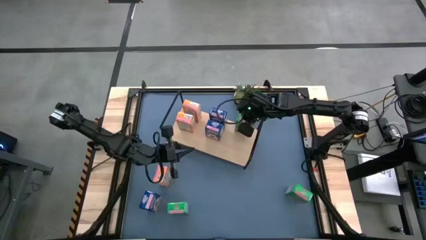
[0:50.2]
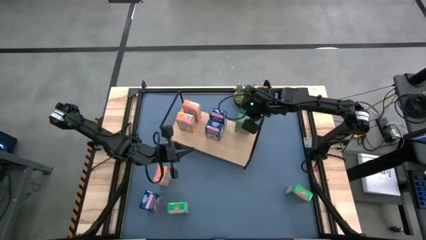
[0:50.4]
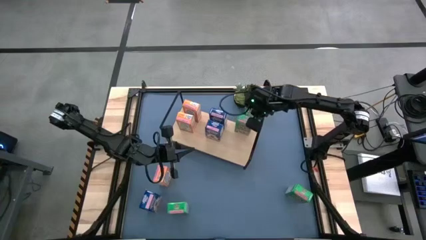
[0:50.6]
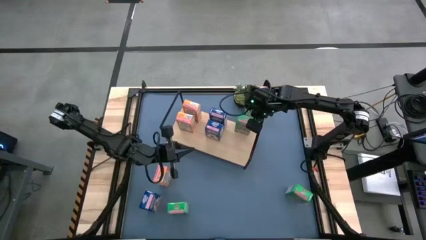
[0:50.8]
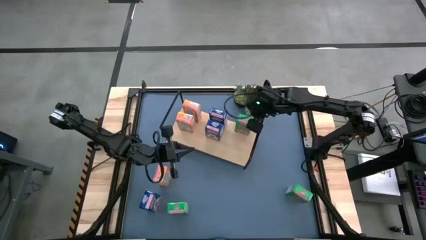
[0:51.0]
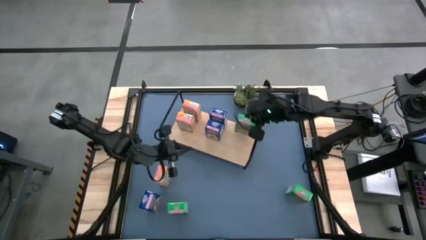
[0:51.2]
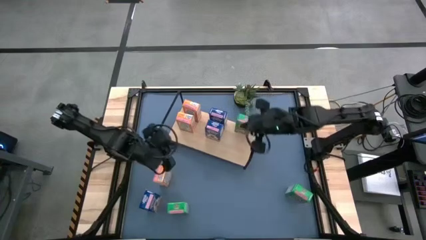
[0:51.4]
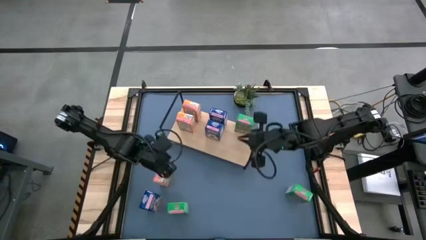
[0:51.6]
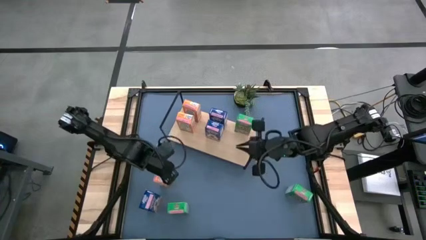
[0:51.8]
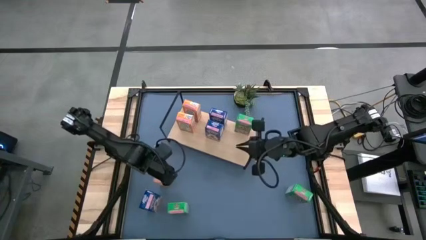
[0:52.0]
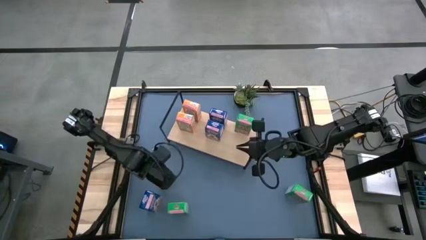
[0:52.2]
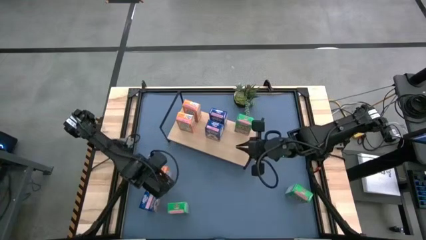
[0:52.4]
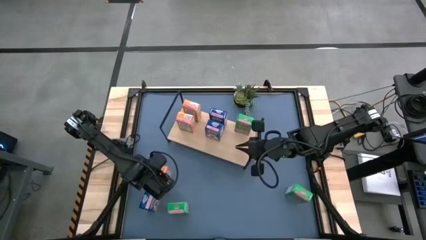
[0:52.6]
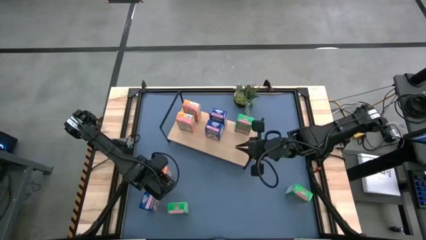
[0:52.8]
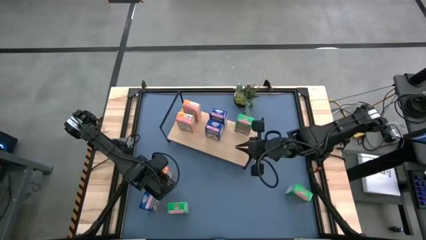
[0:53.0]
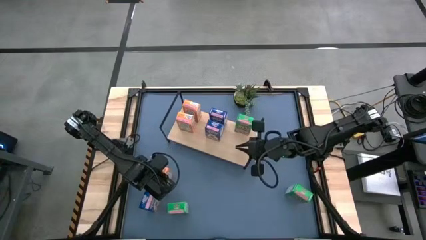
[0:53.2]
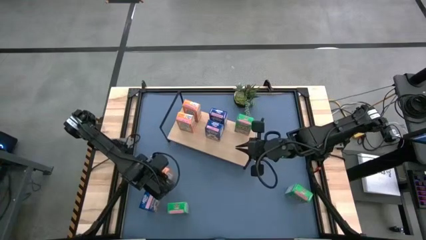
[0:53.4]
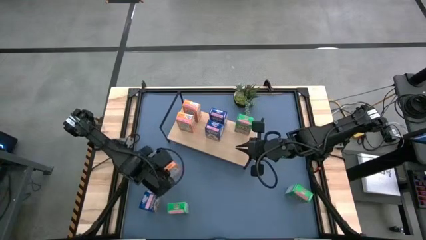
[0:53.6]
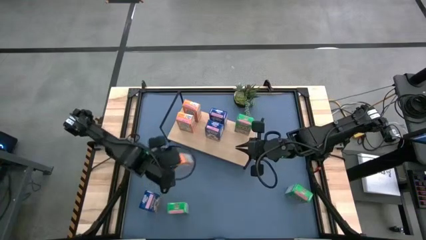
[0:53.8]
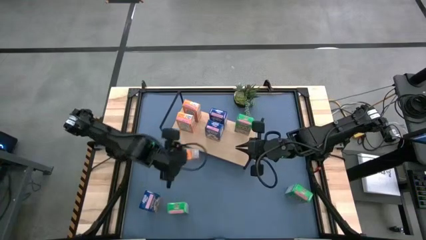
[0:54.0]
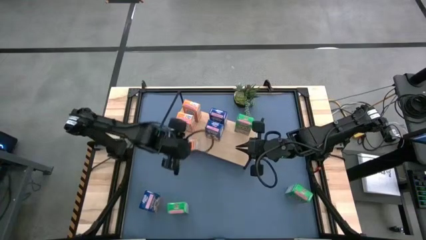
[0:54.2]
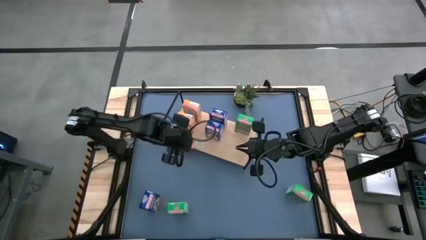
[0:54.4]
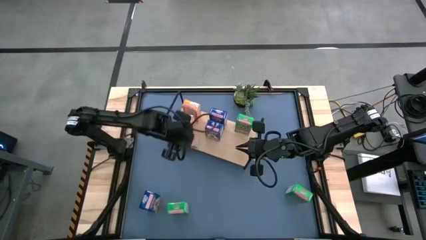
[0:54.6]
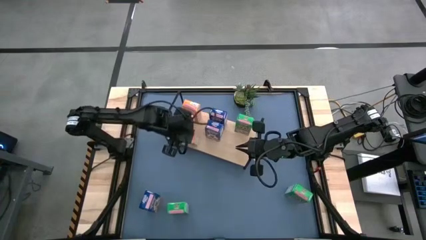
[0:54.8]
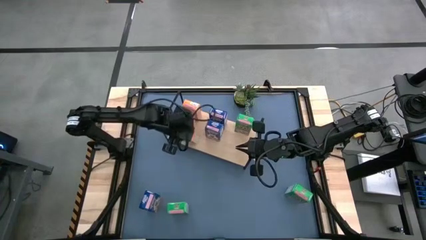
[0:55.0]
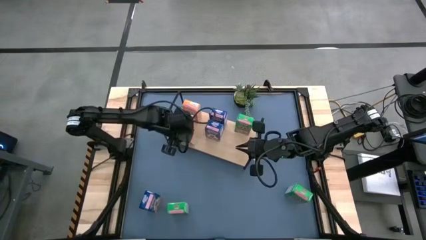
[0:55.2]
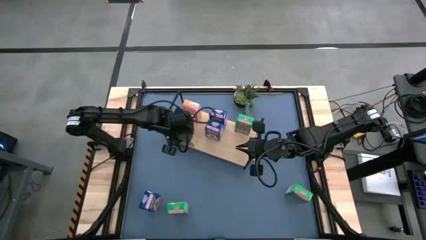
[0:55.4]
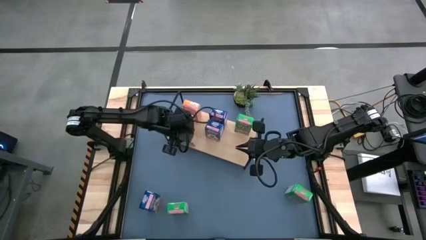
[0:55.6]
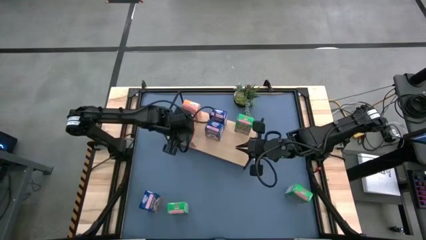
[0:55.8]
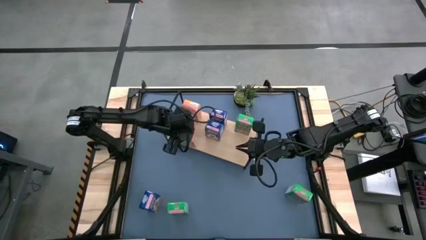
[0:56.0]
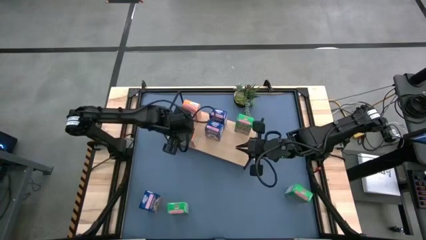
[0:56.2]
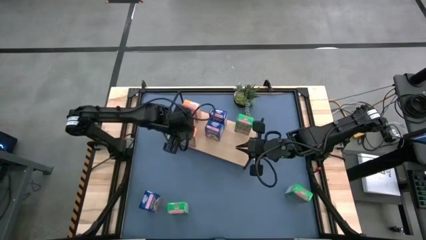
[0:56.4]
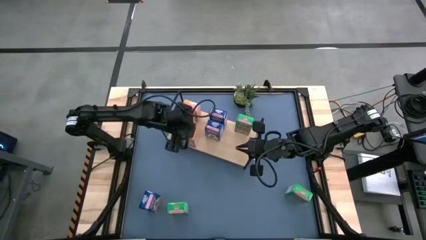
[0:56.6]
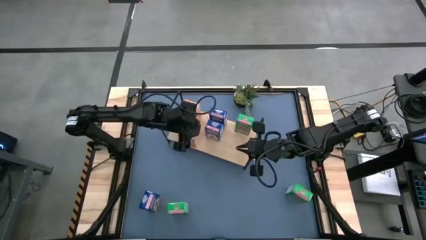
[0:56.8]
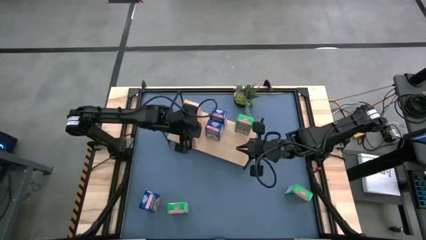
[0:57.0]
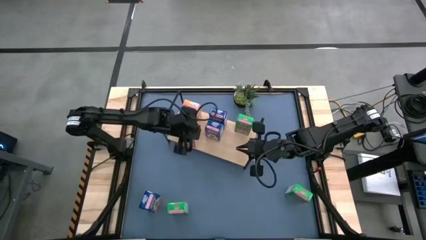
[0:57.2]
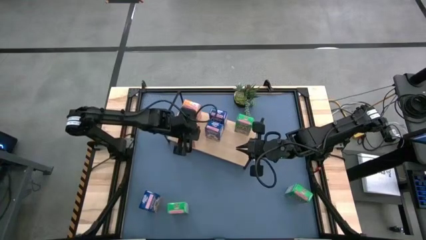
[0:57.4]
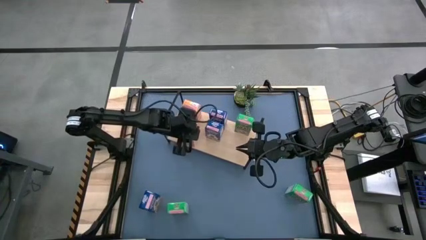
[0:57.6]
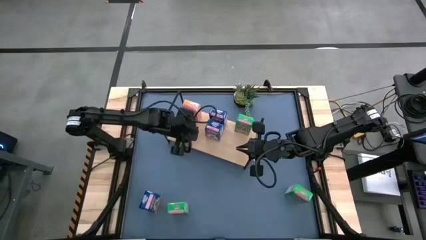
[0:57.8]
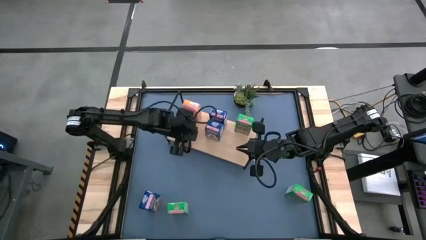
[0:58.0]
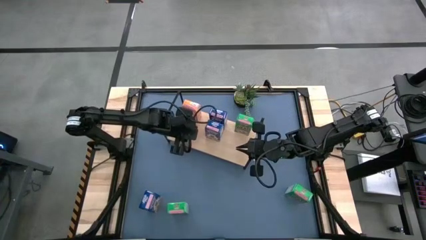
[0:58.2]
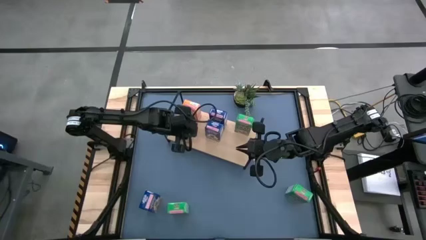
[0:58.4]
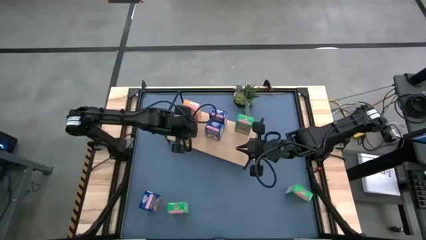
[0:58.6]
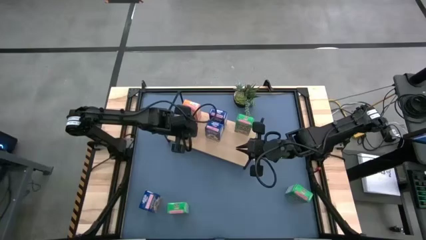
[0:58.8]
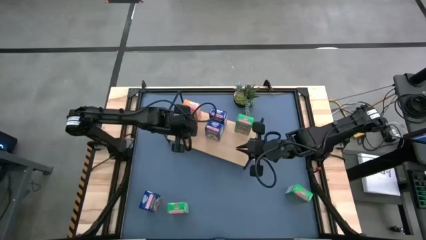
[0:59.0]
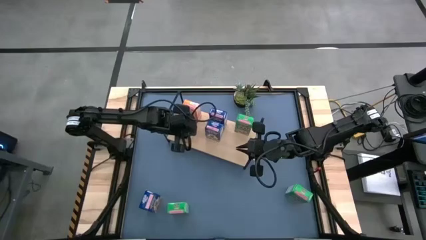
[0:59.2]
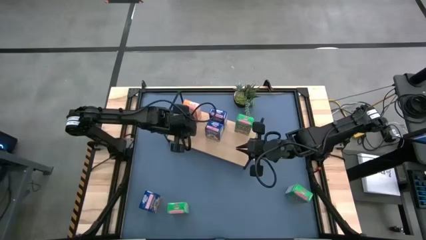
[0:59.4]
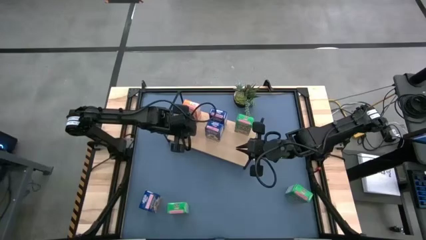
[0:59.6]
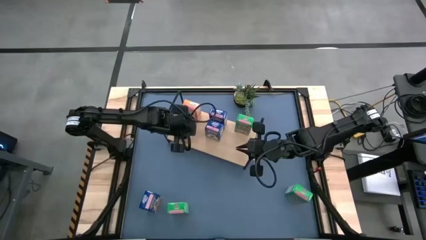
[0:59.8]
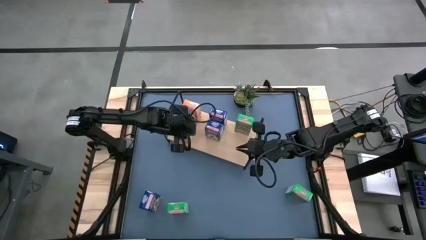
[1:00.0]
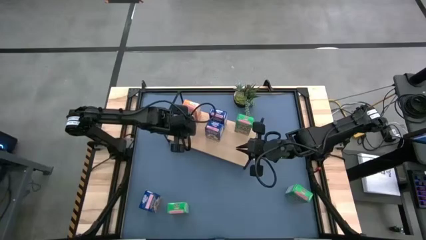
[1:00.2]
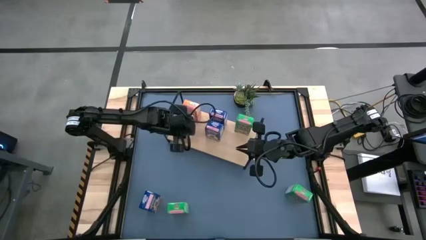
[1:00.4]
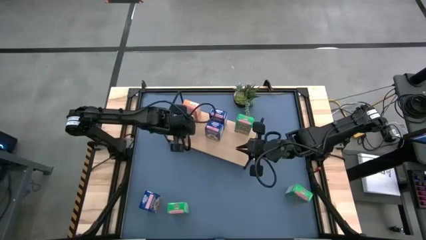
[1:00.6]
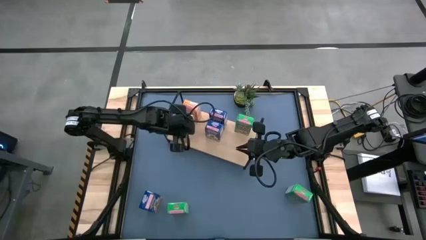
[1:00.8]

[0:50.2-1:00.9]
Task: Stack cereal on shelf
Put the orange cereal box on the shelf aligned with other orange cereal boxes

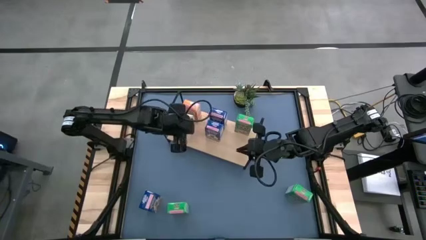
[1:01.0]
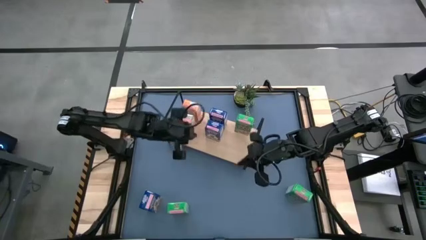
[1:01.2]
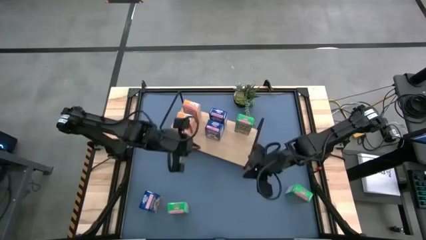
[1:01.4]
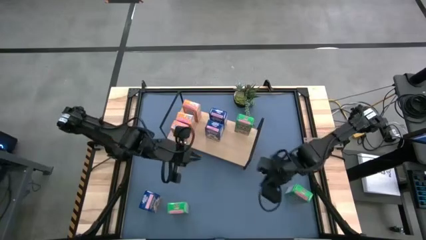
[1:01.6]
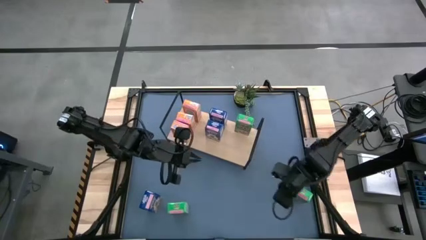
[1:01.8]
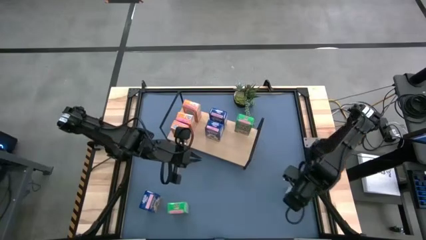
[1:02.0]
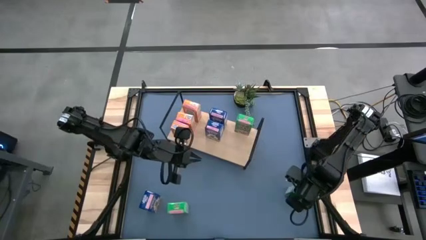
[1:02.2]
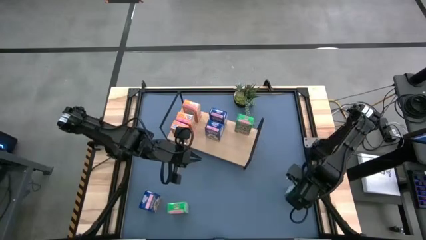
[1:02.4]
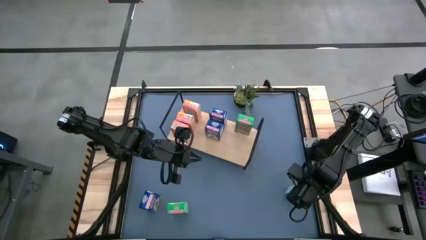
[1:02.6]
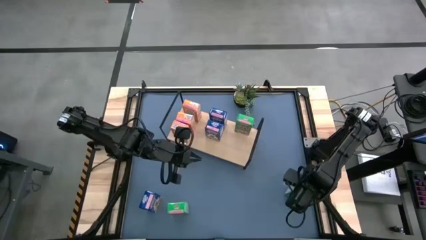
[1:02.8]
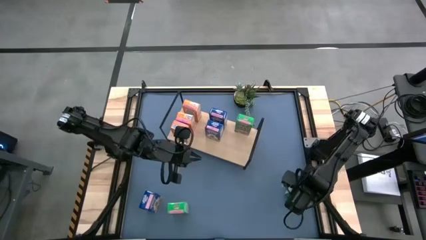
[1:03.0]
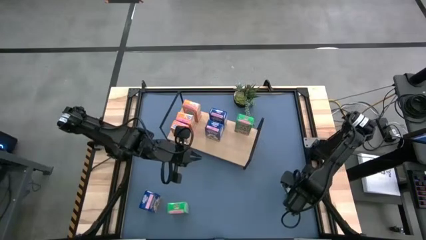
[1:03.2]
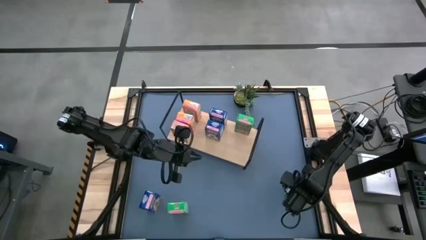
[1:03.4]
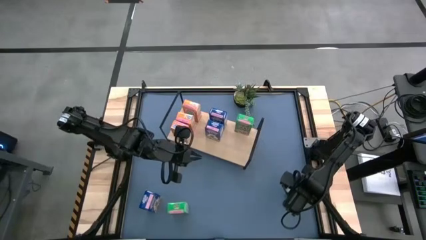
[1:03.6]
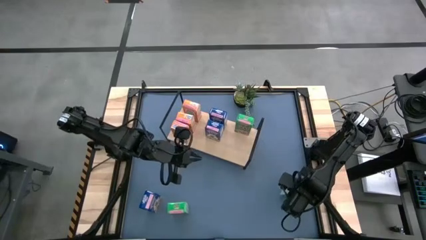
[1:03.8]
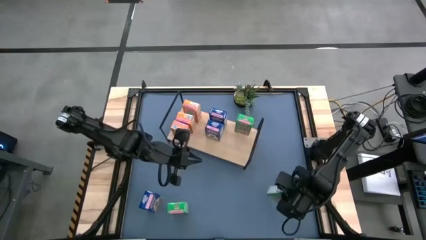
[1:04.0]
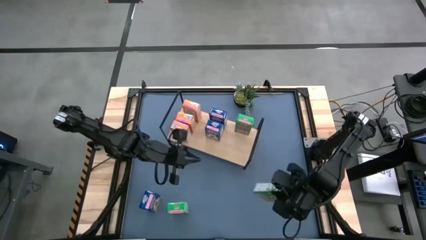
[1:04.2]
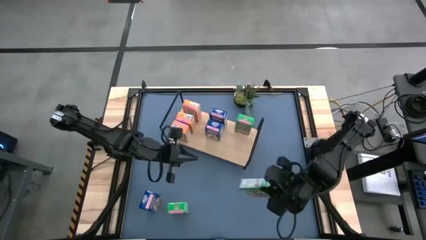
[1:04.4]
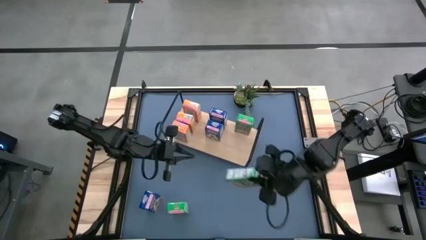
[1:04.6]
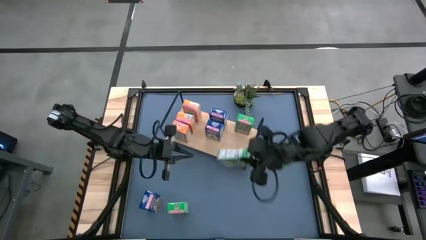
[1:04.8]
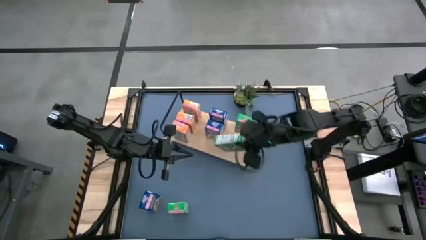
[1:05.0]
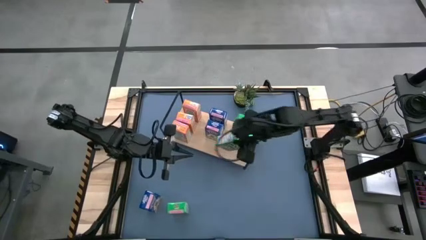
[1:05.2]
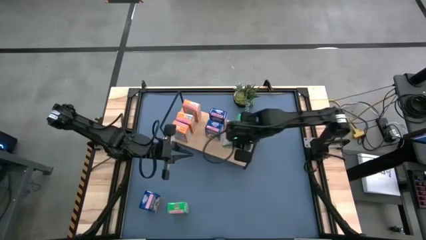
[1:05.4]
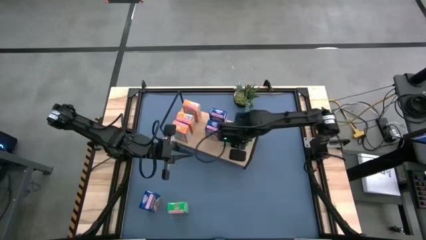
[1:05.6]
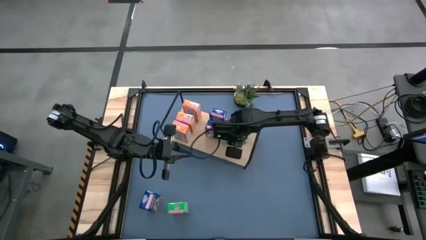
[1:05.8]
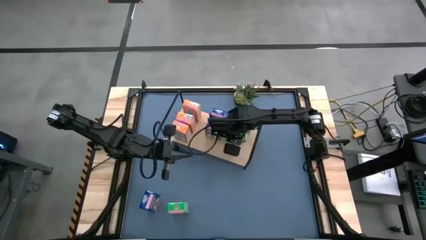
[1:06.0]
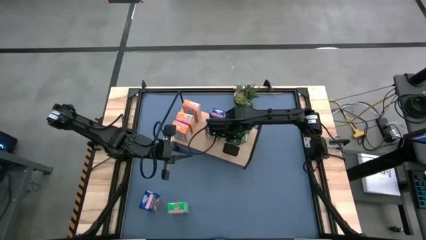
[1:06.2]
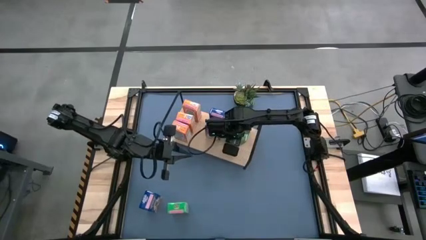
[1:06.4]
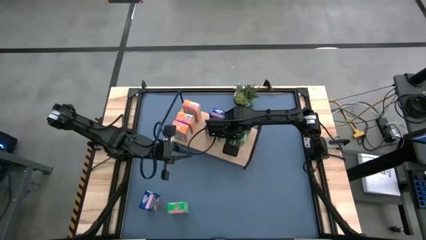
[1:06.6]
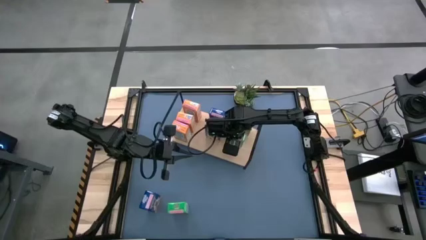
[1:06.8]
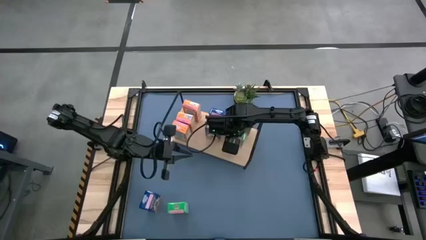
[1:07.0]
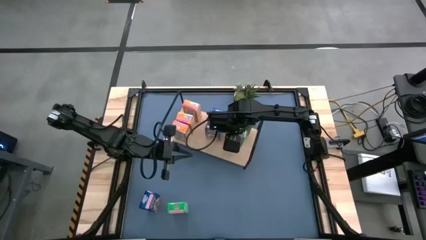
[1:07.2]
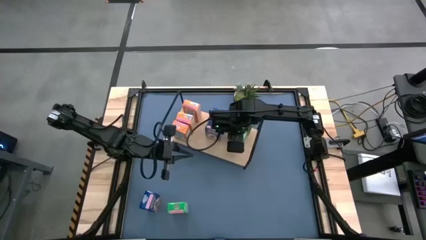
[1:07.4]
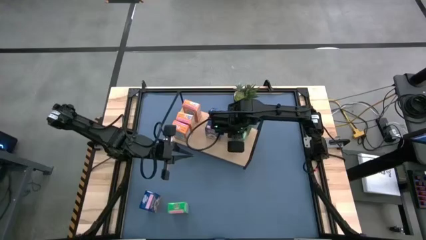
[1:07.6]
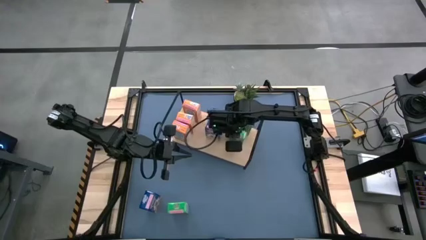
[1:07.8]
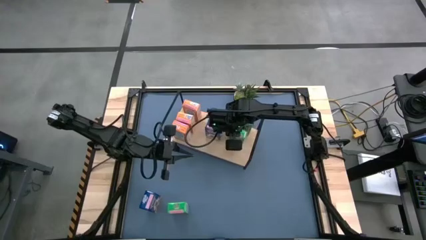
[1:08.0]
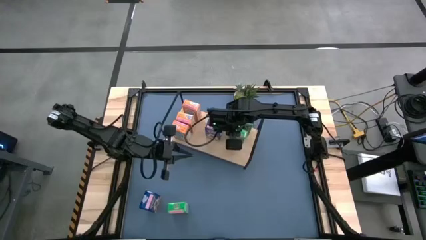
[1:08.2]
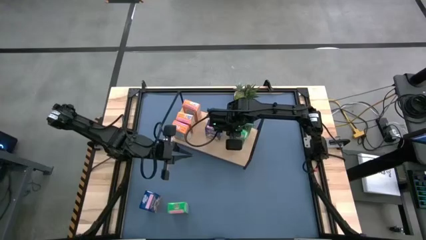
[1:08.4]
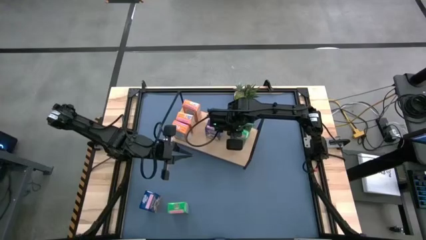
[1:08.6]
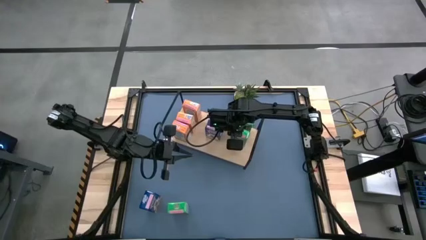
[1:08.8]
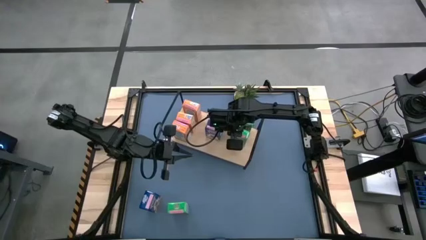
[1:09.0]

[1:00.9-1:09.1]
Put the right green cereal box on the shelf aligned with other green cereal box
